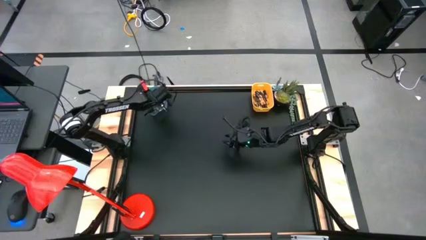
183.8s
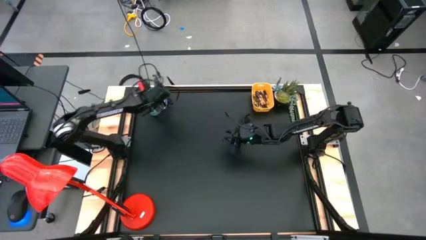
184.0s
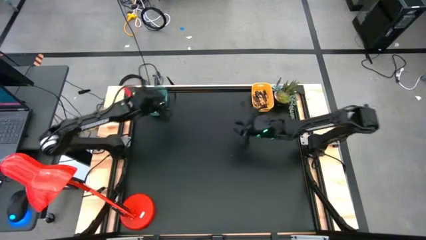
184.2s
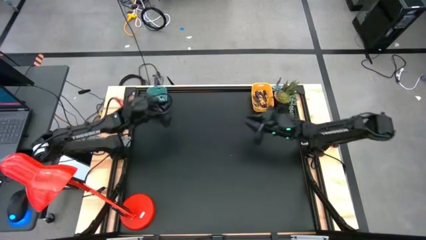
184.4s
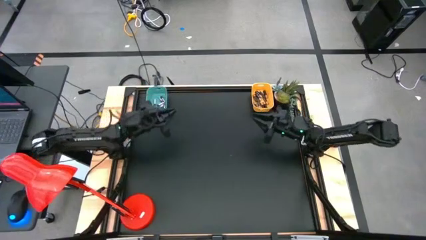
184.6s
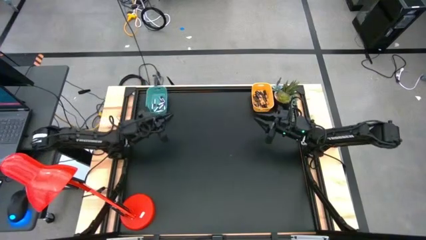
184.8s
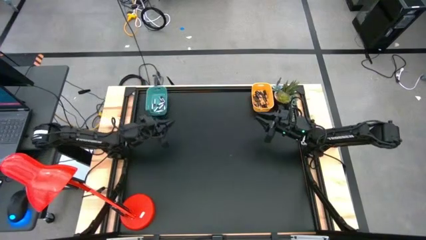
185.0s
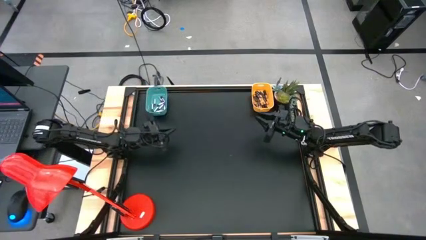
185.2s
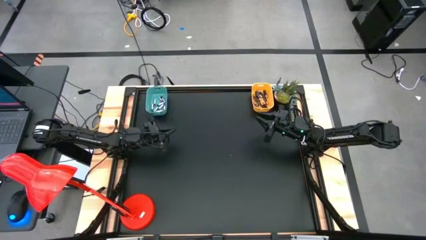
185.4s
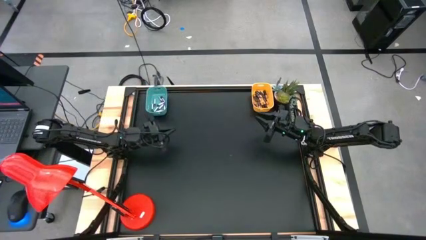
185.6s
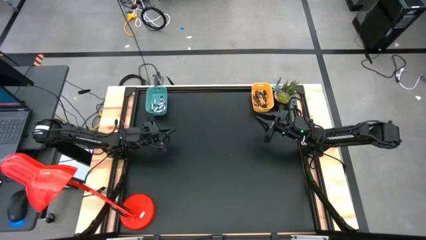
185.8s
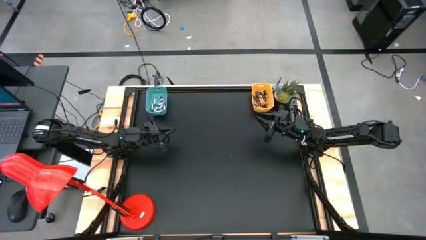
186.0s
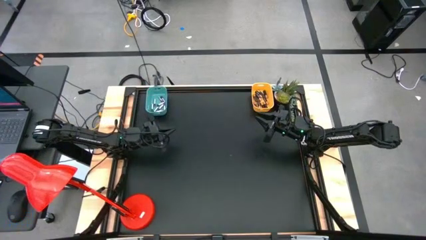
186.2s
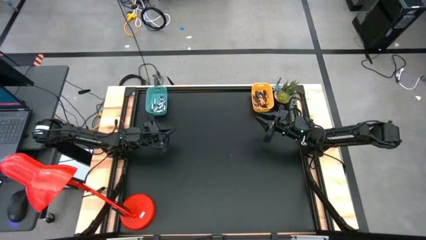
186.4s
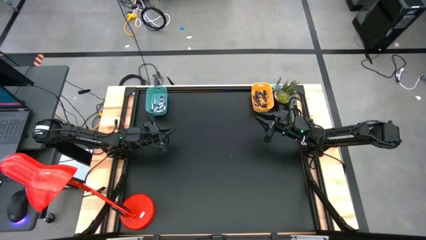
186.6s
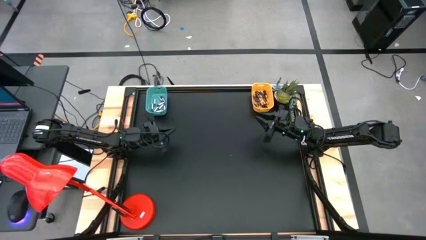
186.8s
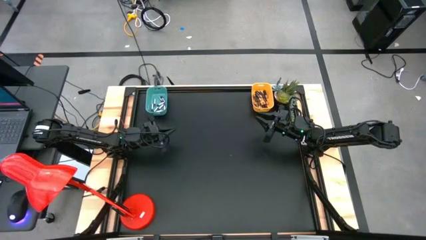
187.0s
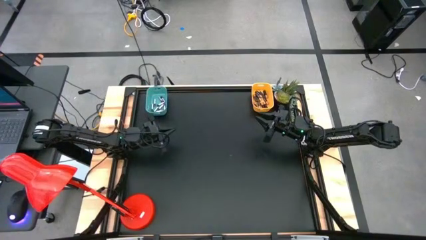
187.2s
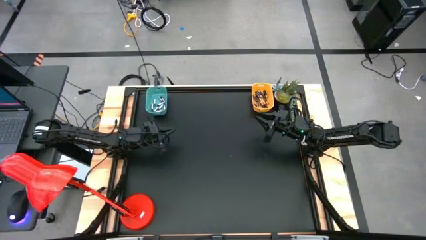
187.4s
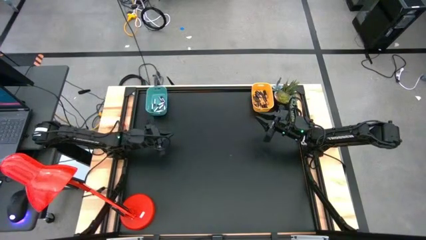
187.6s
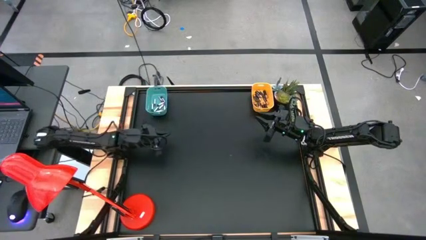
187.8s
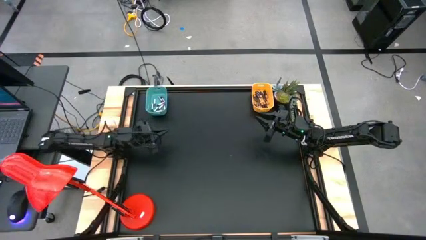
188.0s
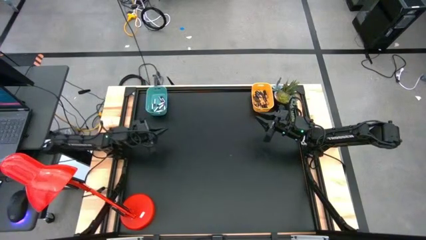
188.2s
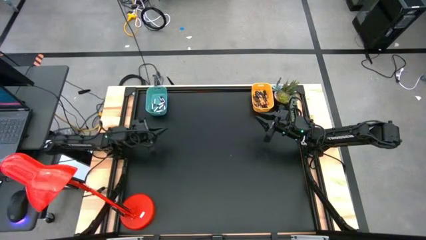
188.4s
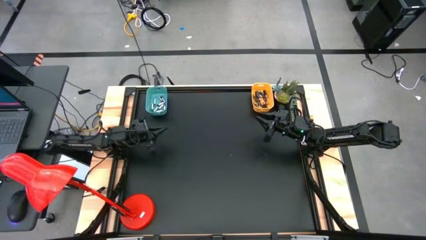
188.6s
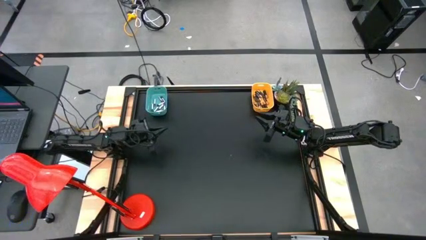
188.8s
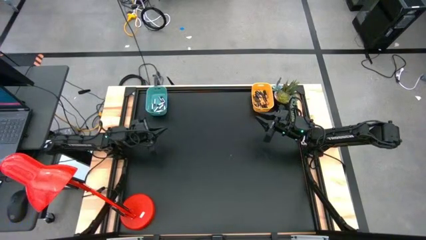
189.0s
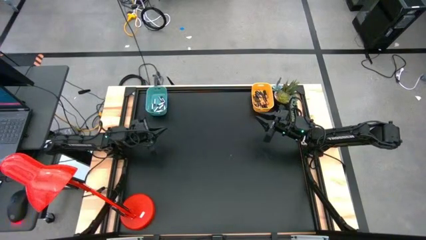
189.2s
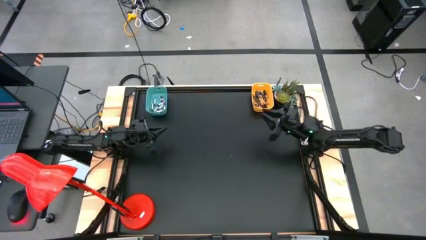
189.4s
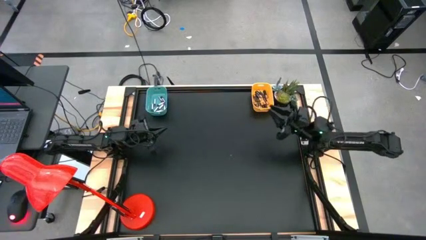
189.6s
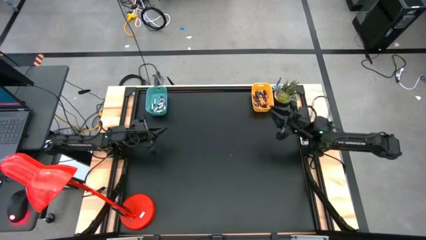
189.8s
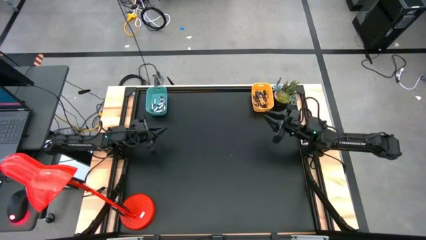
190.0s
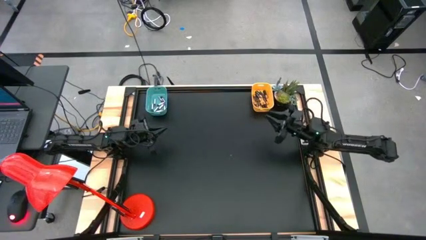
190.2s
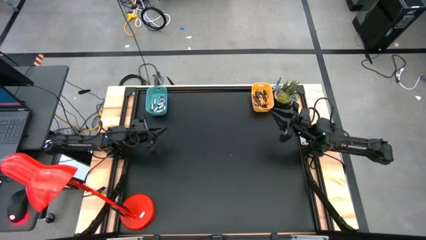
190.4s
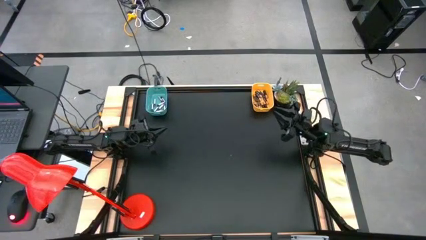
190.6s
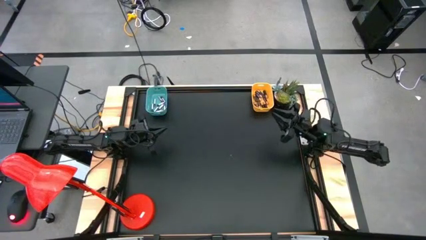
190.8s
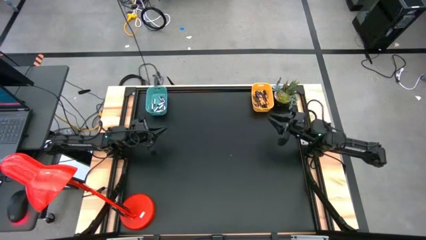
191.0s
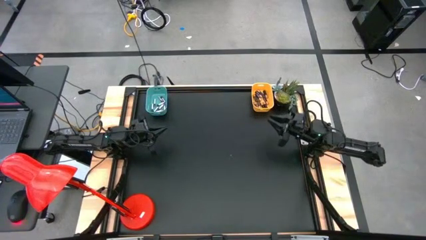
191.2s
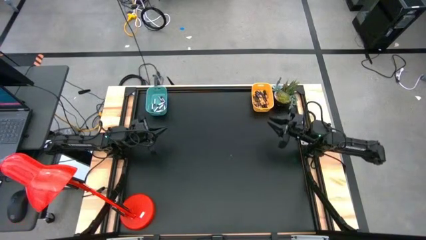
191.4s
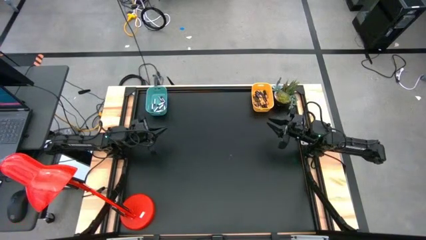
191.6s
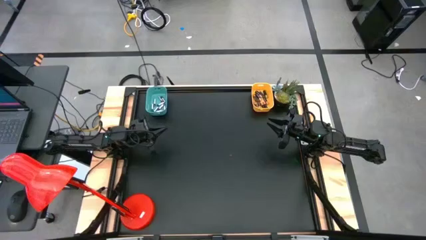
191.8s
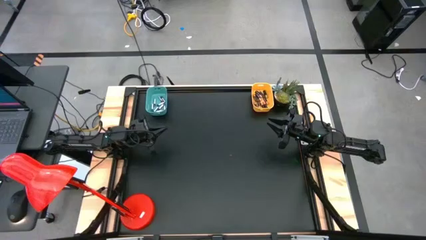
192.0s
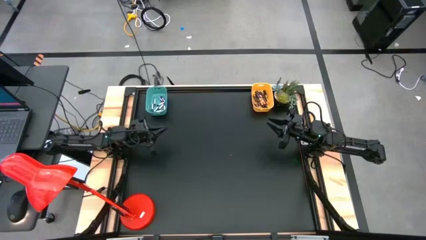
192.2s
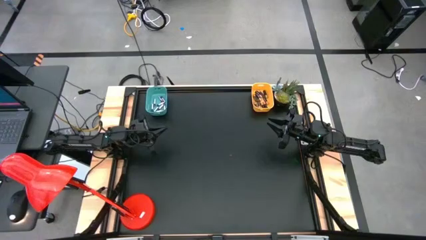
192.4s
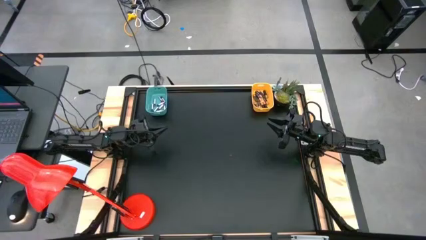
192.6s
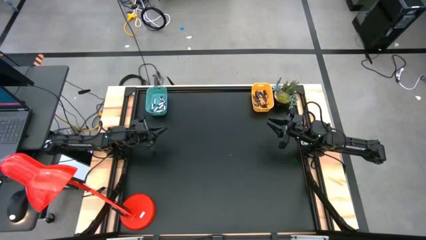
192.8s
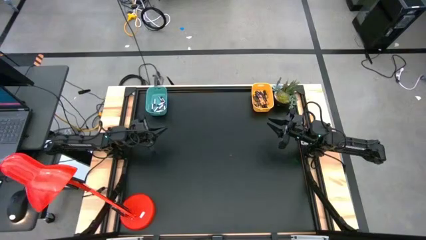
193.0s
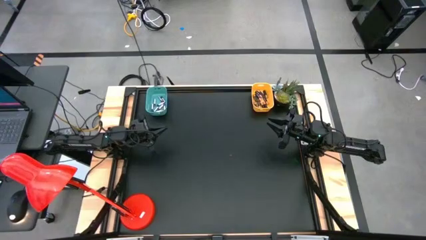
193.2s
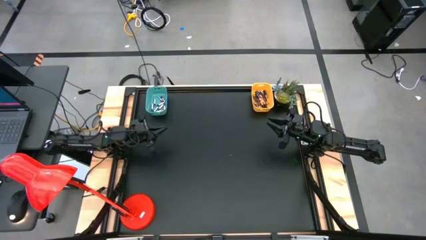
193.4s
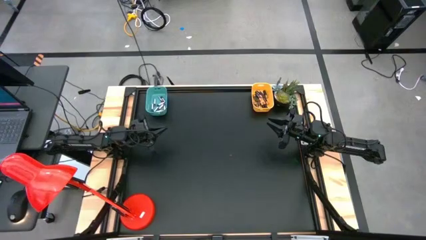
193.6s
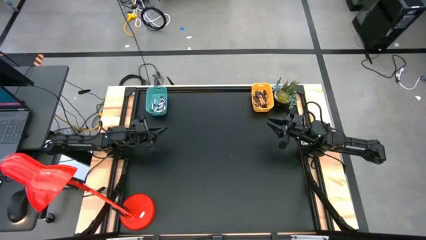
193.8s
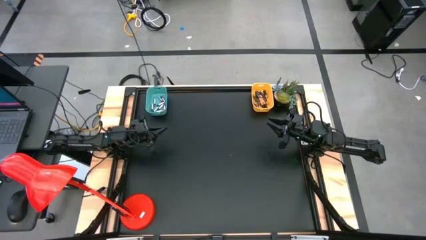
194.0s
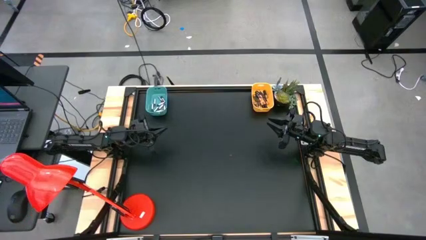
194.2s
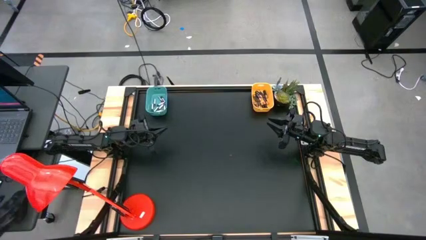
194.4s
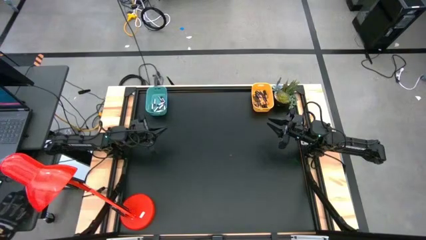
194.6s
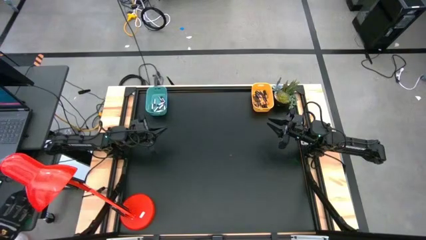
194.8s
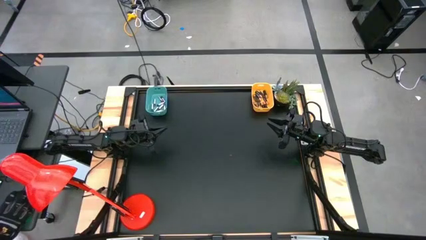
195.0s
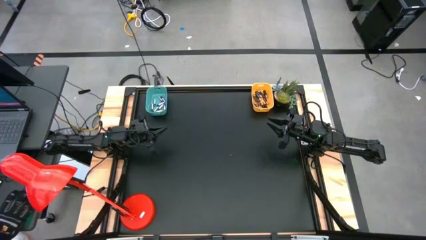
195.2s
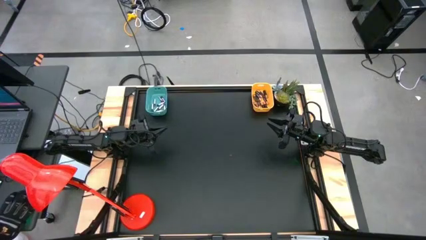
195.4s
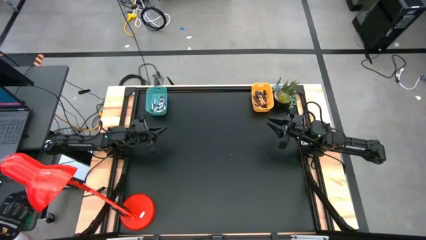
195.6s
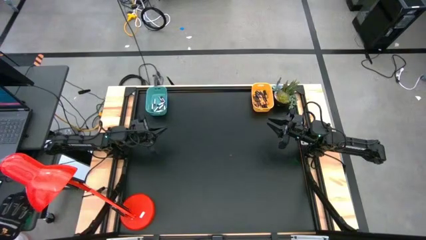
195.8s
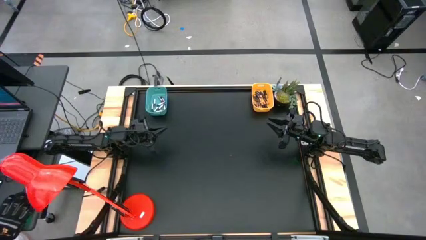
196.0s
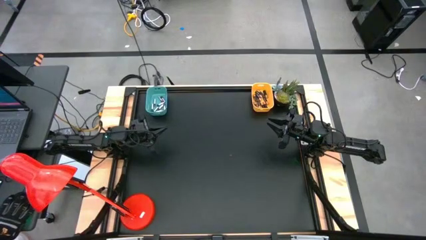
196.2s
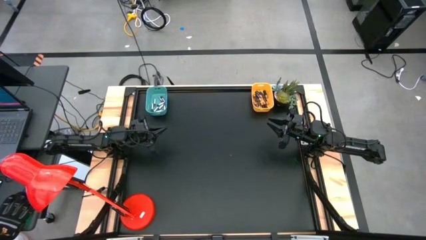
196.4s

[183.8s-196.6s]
Task: Sort batteries
Return to Home Position
